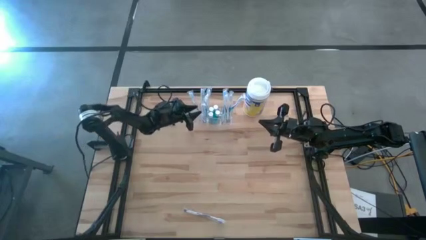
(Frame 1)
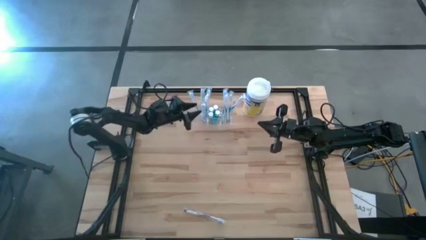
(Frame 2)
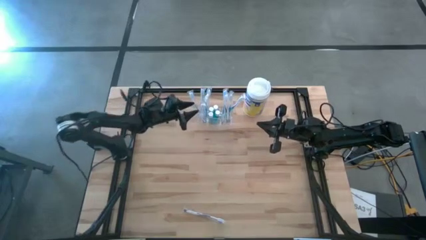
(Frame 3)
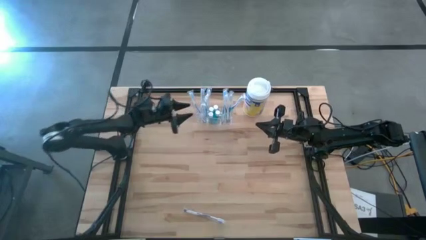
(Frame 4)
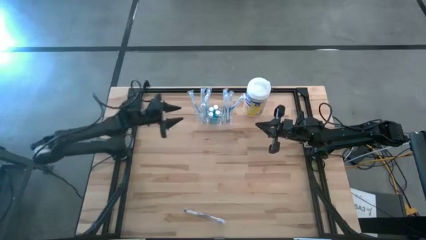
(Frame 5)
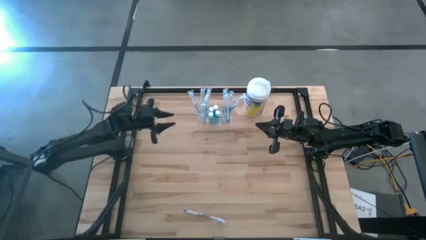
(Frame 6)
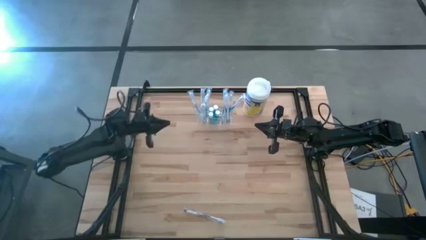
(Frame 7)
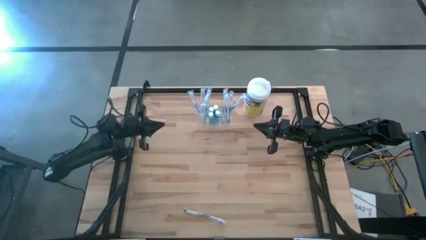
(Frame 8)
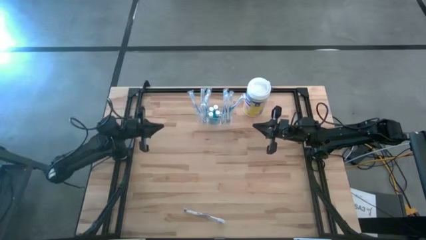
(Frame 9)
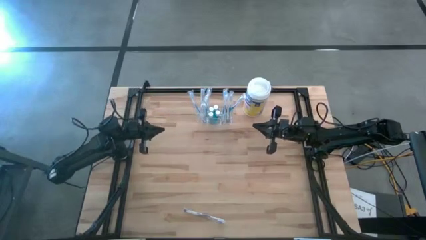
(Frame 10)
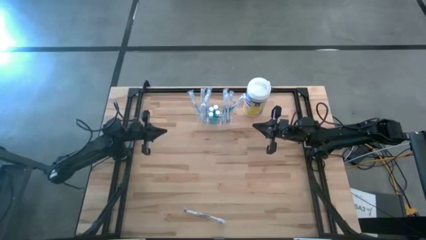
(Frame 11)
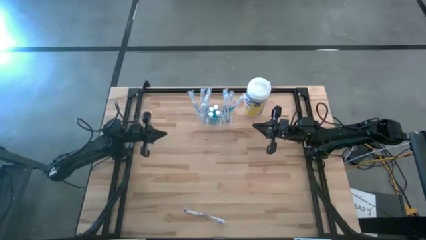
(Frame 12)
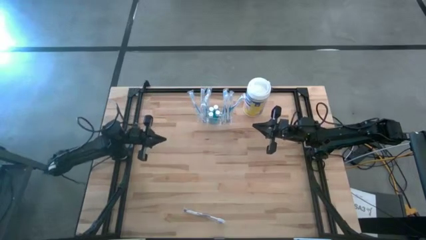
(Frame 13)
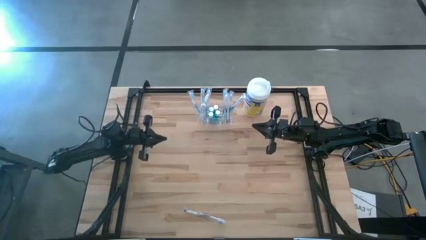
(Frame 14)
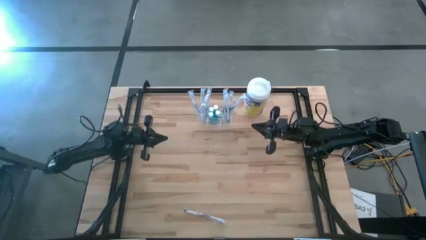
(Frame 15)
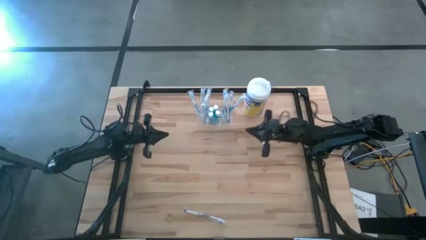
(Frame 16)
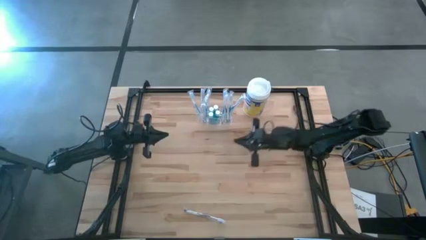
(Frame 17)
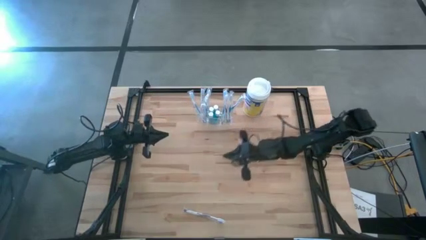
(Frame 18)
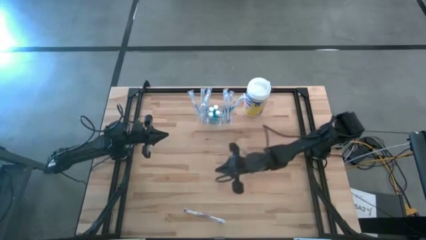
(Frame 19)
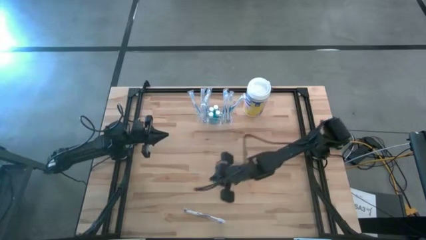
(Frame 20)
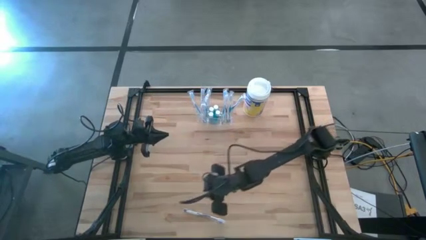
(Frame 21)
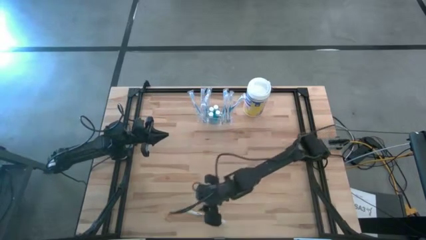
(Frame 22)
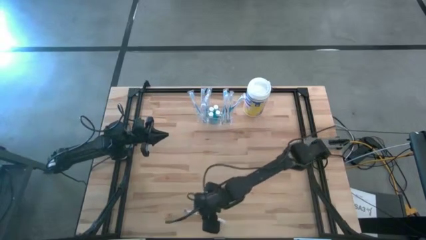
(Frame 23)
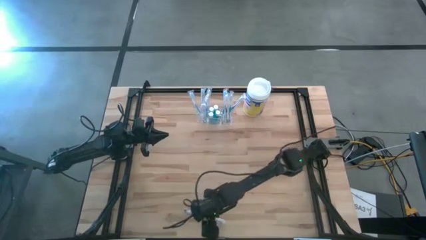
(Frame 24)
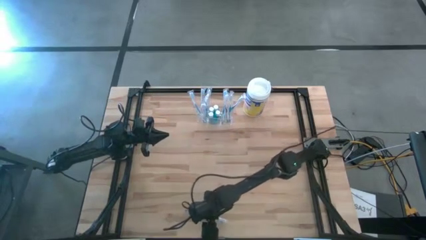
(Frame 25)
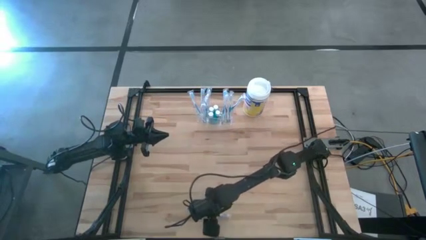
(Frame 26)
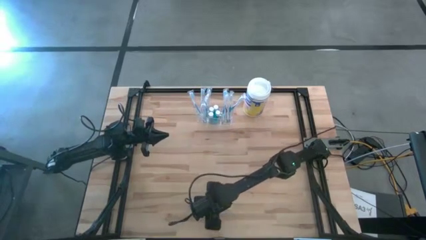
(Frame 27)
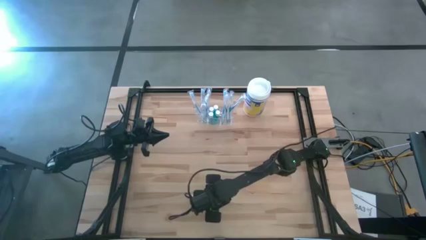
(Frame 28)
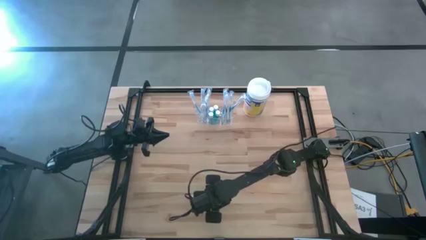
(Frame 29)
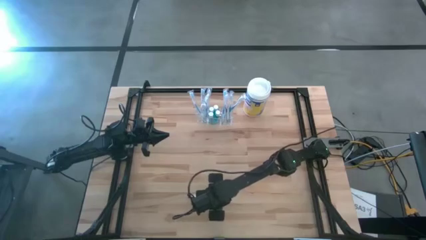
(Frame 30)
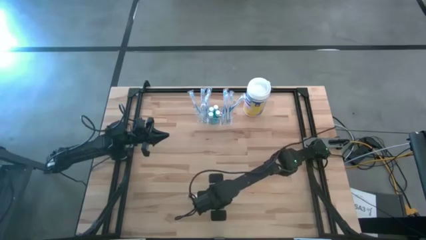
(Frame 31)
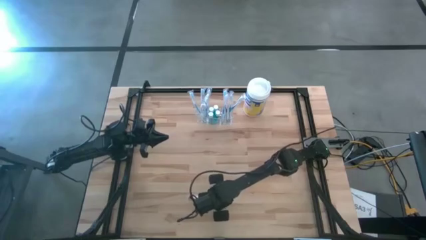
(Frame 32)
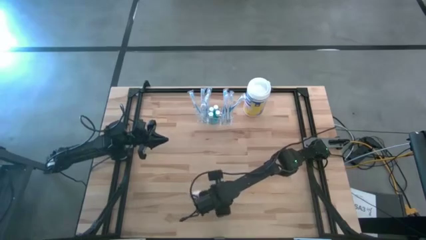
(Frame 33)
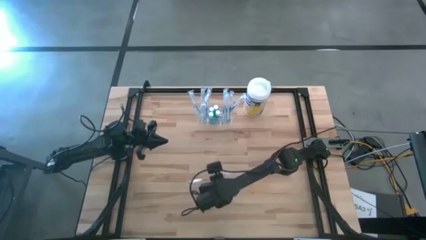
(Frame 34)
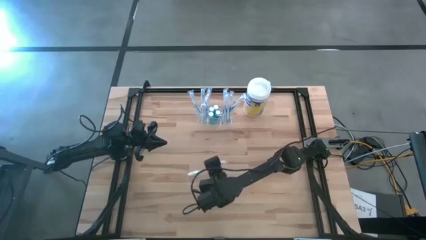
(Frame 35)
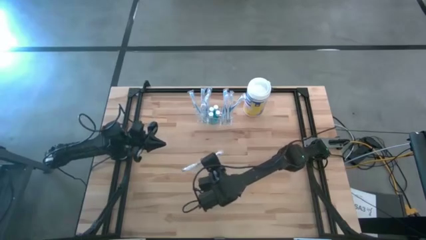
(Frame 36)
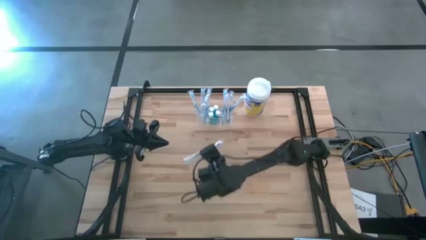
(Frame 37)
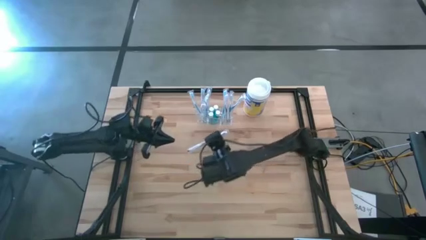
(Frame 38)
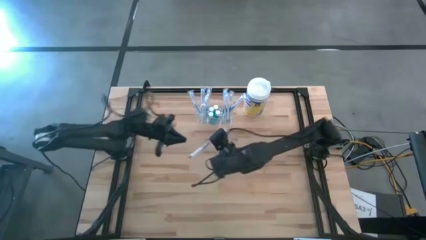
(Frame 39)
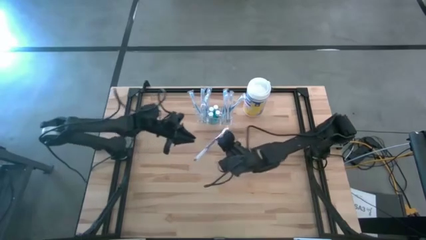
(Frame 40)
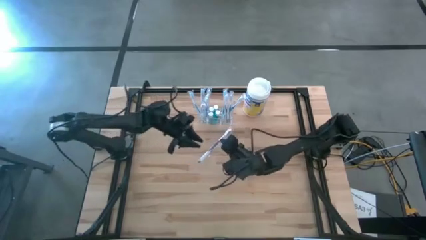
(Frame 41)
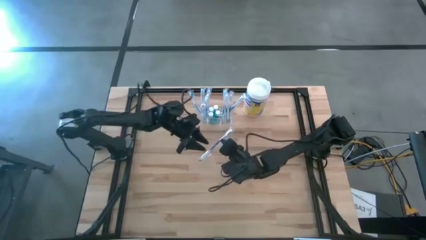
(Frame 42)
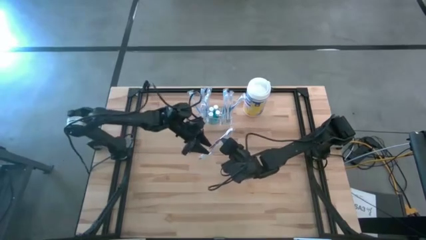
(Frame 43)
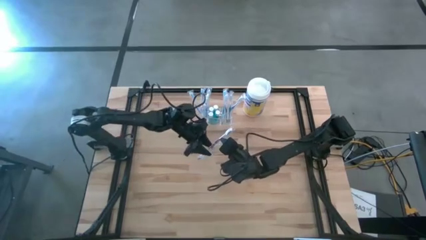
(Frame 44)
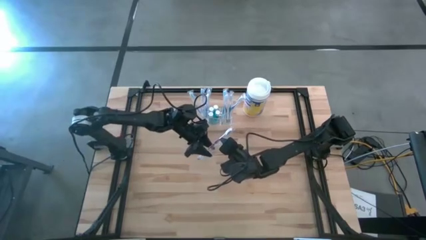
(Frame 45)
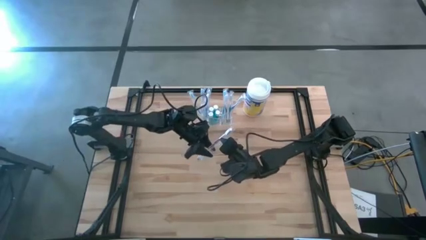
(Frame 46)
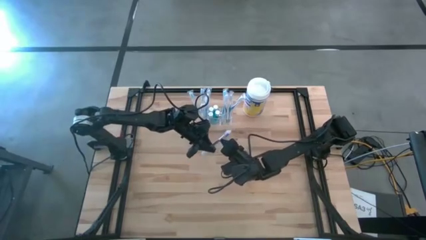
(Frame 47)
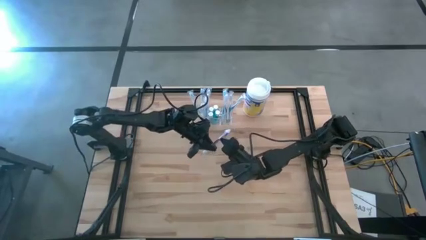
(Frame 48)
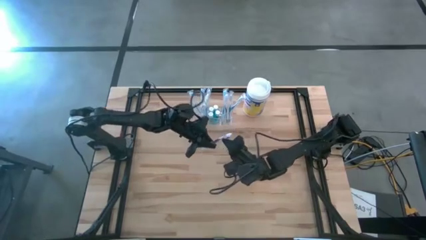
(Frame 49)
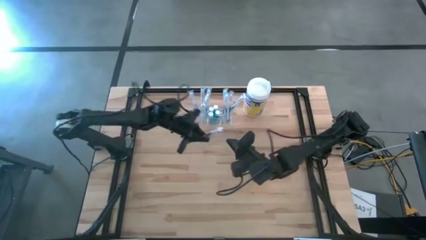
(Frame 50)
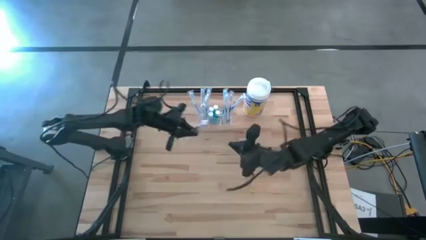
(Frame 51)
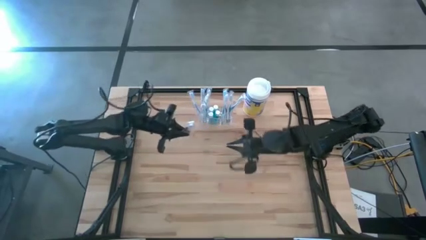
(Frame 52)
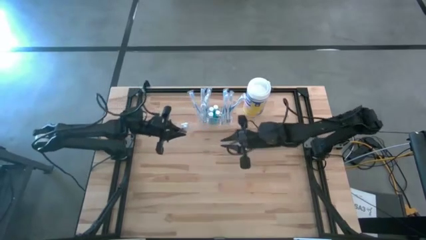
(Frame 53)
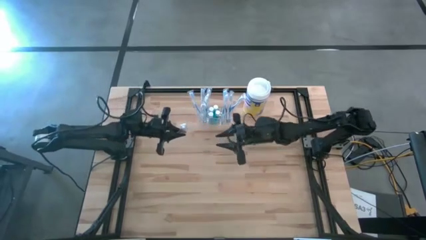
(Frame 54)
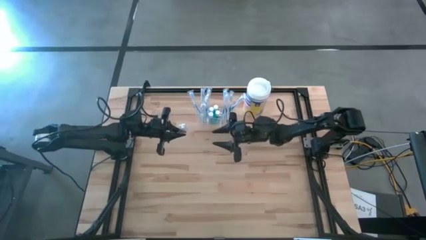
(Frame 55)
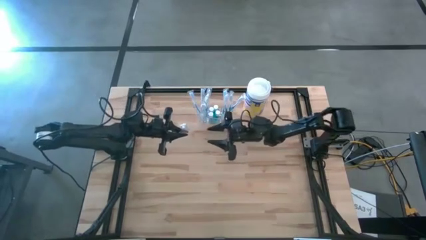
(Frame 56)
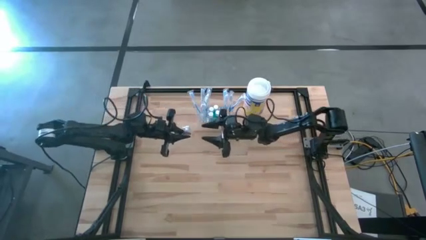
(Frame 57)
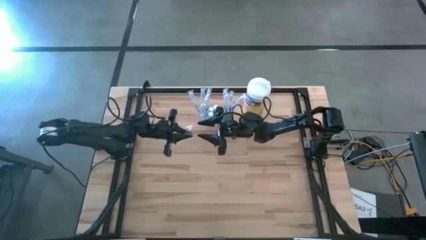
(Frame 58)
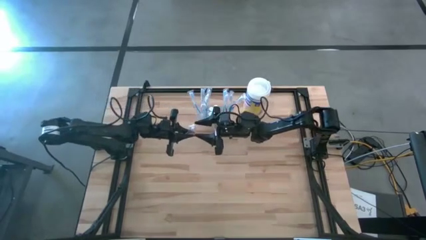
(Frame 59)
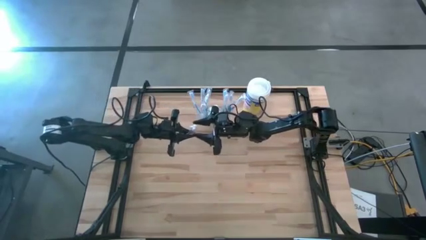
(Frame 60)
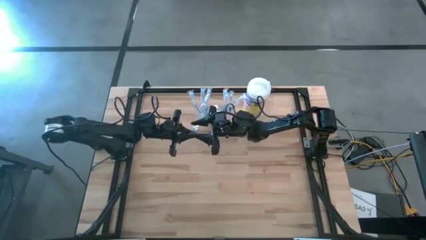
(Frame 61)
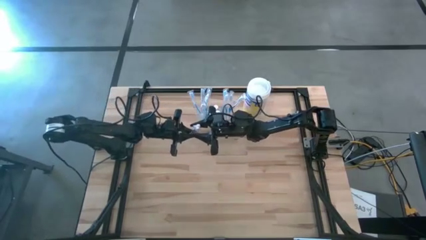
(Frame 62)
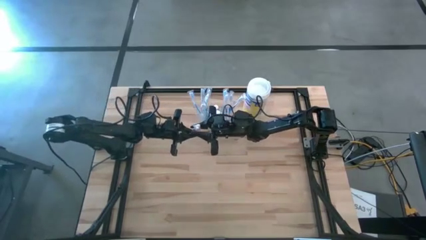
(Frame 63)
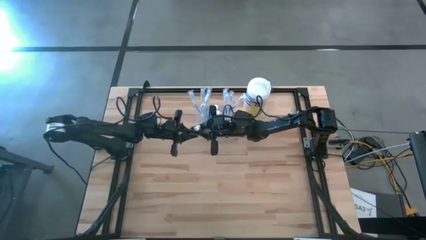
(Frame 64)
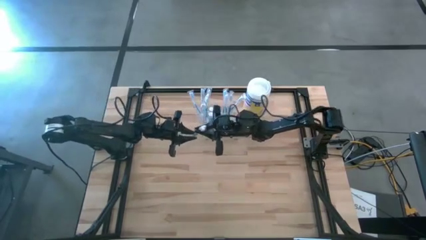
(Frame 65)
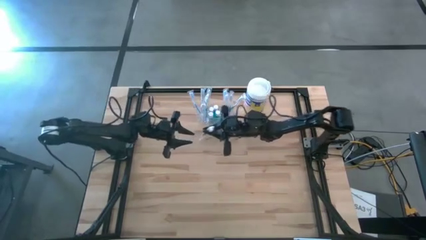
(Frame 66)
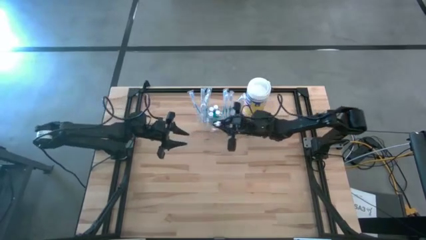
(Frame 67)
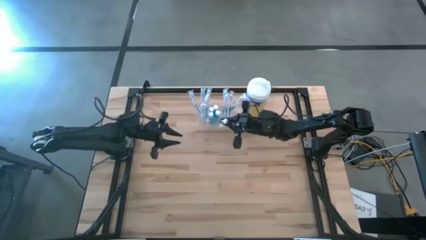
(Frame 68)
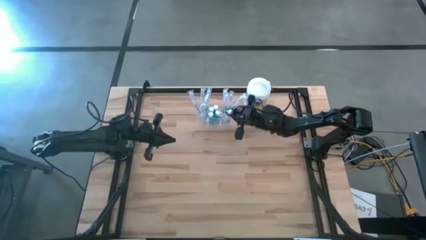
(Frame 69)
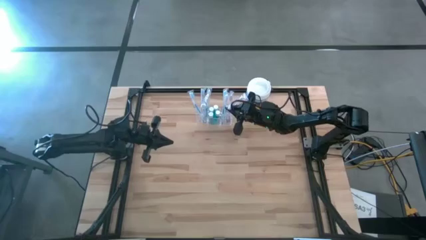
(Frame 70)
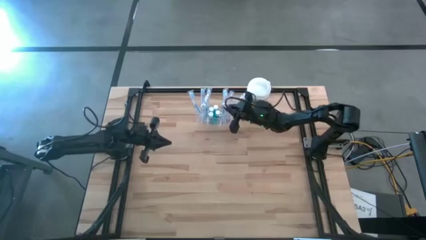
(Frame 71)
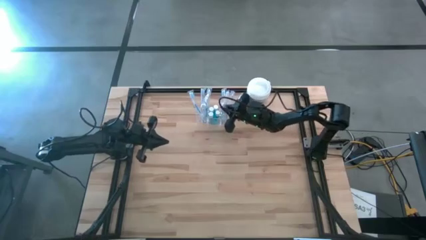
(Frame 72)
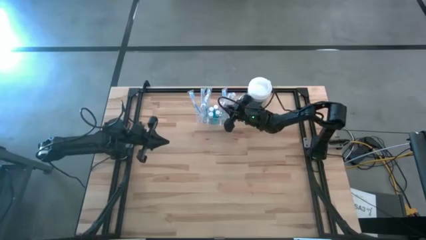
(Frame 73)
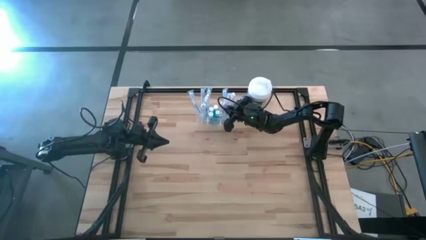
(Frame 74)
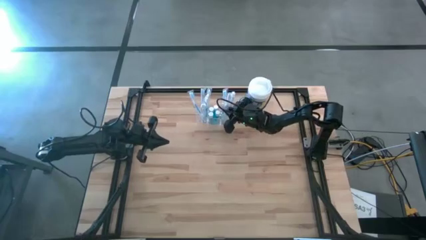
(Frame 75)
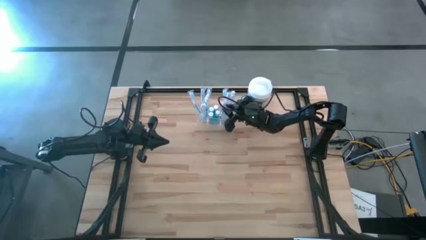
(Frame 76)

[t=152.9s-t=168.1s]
Task: Pick & Place toothbrushing station
Put the violet toothbrush into the transparent toothbrush holder

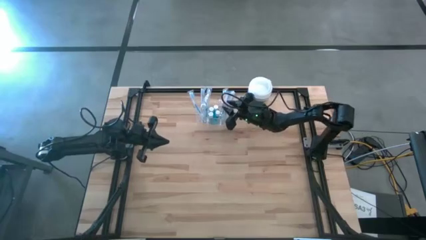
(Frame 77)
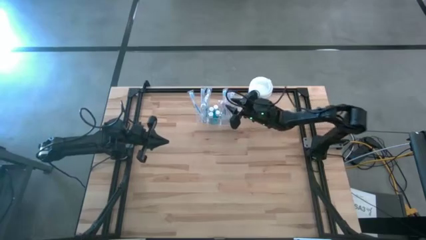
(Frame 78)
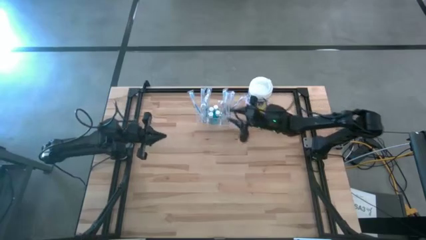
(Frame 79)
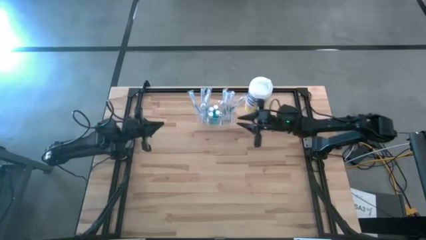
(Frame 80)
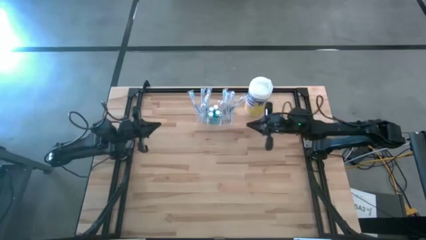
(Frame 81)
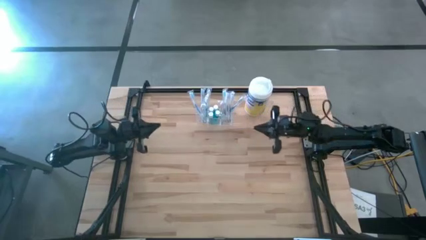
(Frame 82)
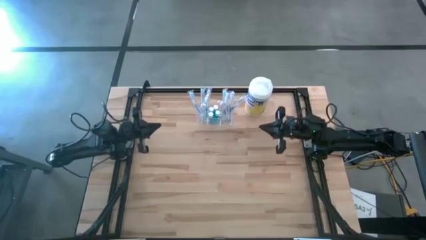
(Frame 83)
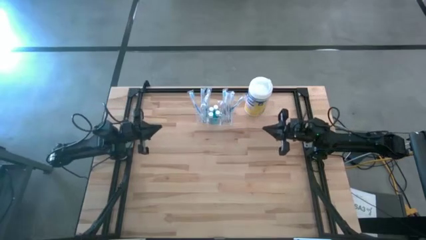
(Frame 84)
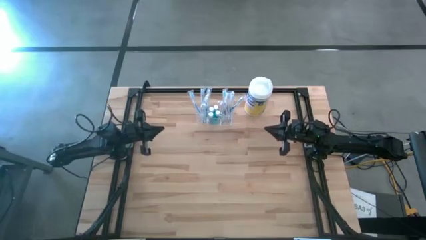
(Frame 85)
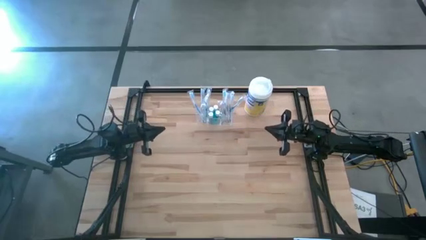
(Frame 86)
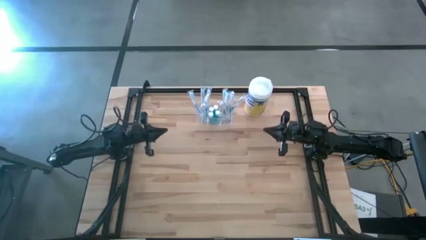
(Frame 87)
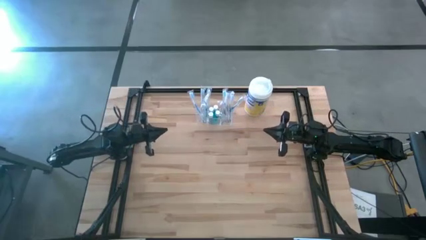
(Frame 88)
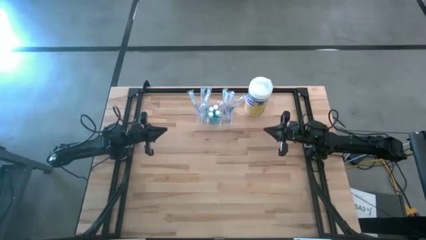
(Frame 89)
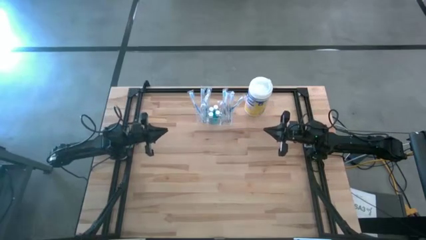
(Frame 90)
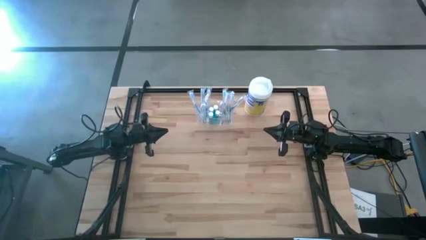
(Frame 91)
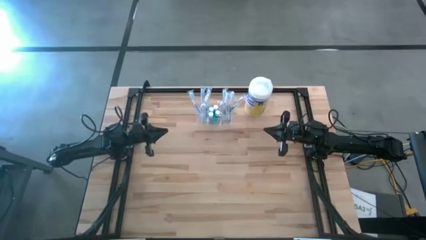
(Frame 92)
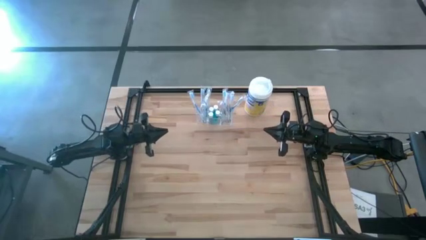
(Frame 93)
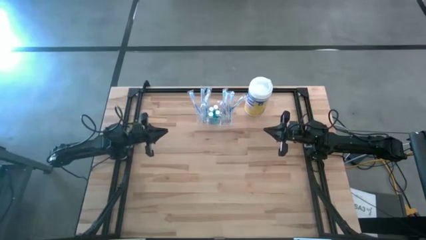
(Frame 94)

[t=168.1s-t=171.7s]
Return to Home Position
